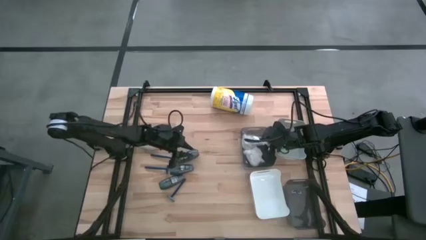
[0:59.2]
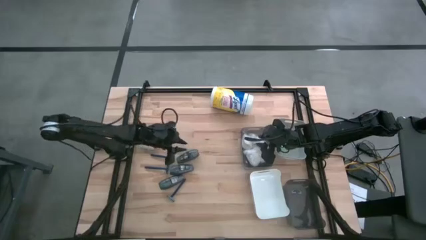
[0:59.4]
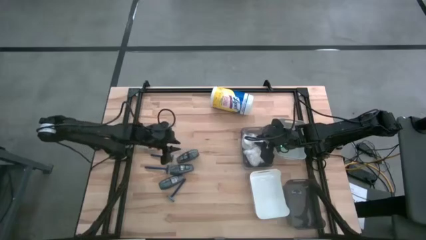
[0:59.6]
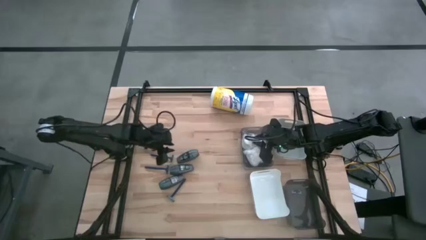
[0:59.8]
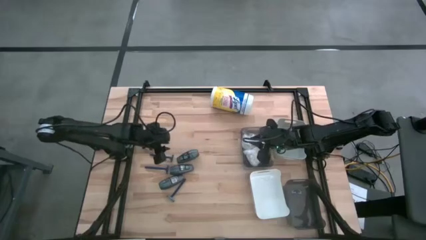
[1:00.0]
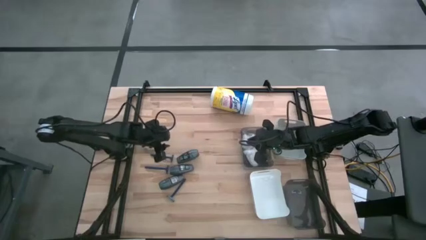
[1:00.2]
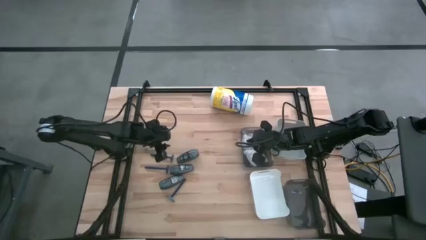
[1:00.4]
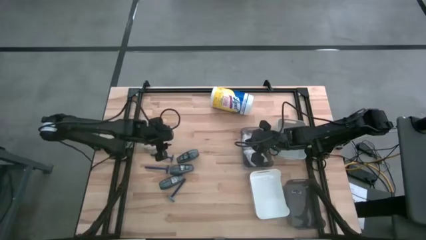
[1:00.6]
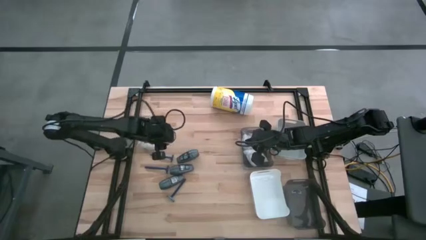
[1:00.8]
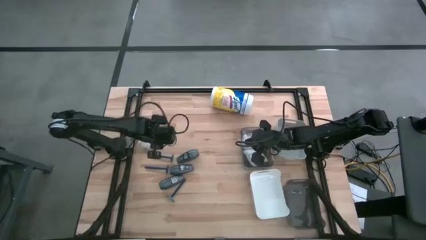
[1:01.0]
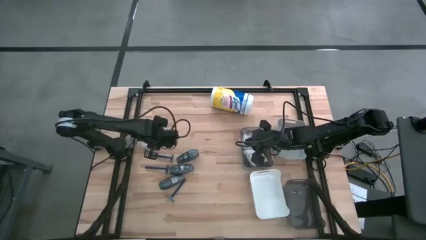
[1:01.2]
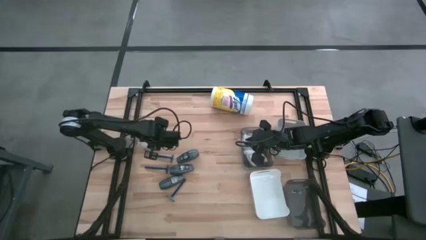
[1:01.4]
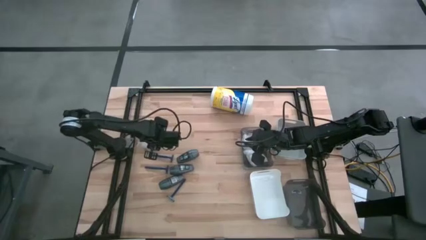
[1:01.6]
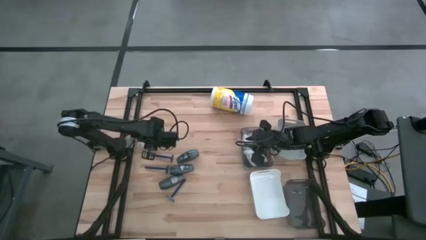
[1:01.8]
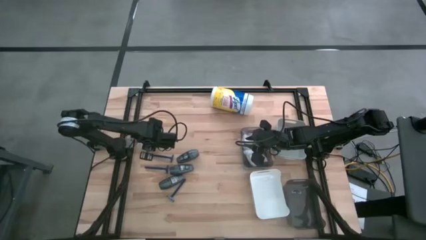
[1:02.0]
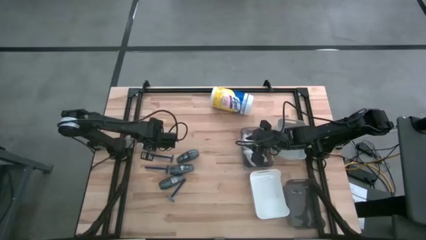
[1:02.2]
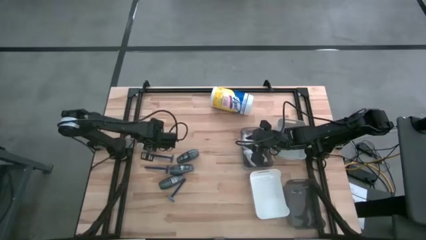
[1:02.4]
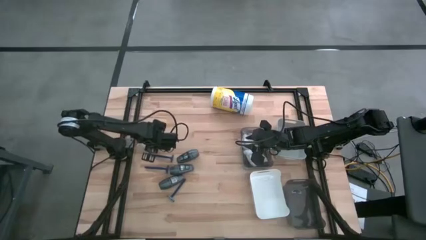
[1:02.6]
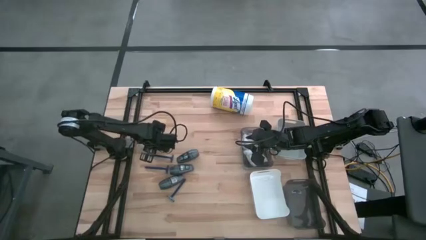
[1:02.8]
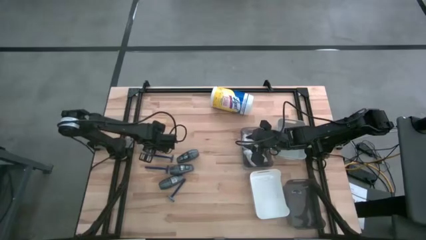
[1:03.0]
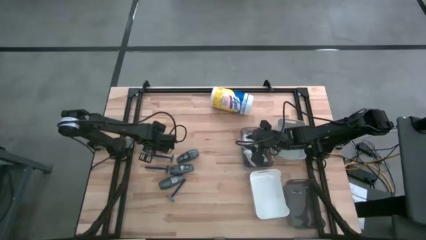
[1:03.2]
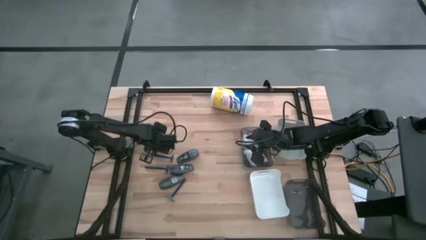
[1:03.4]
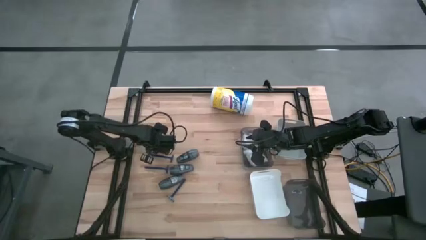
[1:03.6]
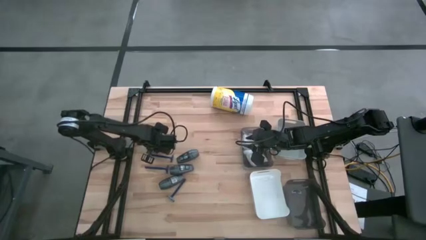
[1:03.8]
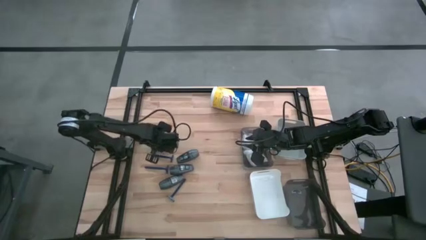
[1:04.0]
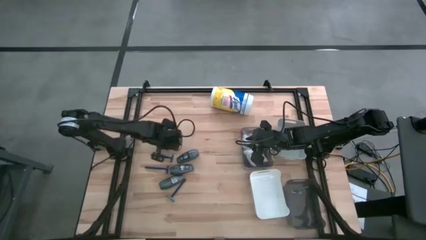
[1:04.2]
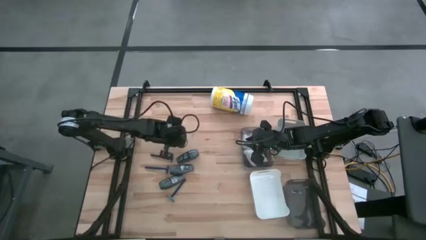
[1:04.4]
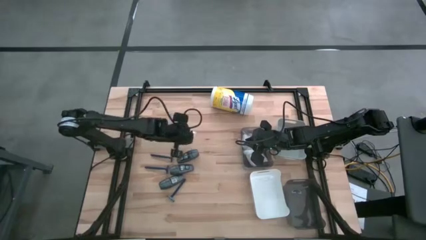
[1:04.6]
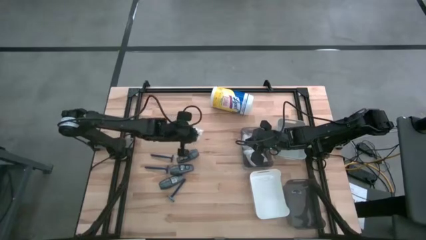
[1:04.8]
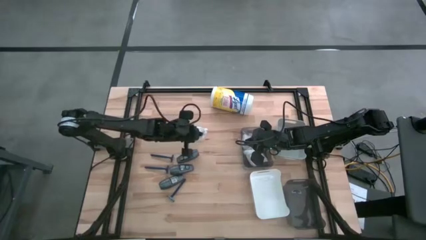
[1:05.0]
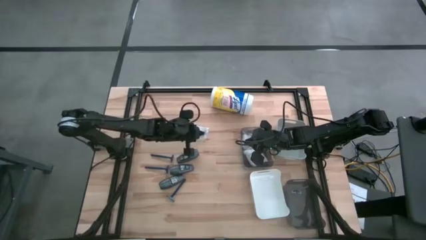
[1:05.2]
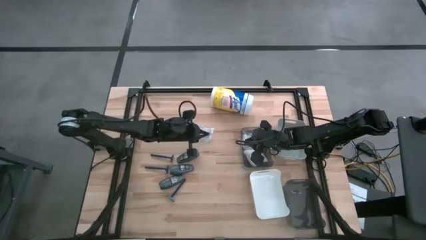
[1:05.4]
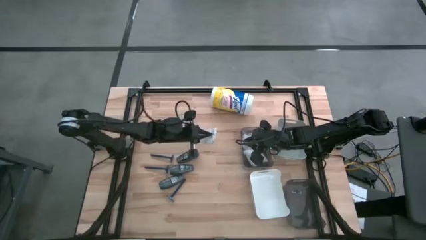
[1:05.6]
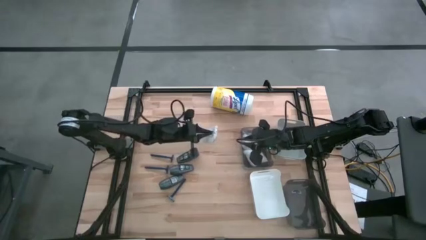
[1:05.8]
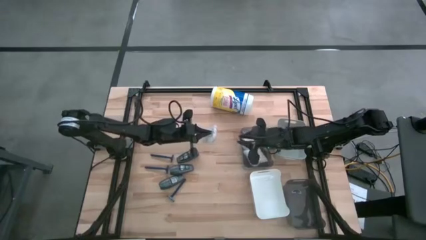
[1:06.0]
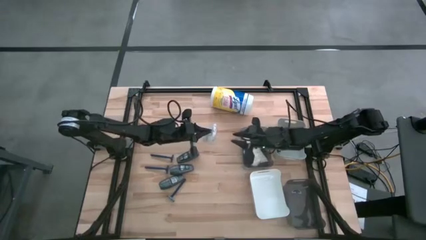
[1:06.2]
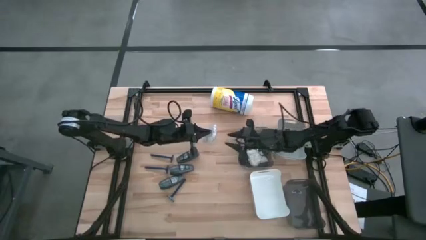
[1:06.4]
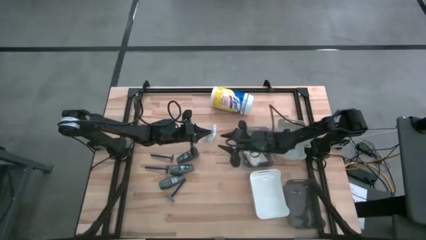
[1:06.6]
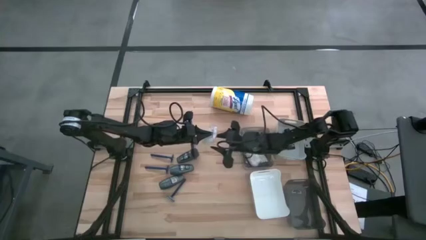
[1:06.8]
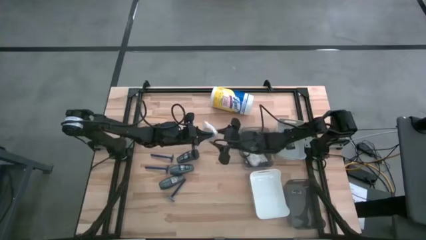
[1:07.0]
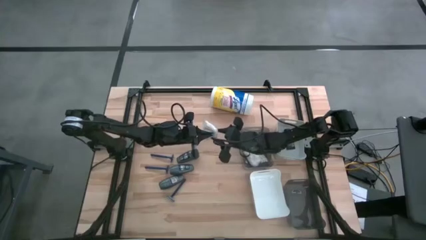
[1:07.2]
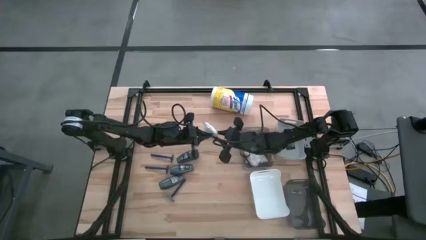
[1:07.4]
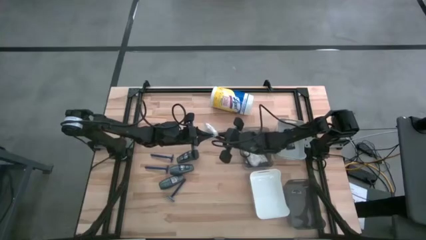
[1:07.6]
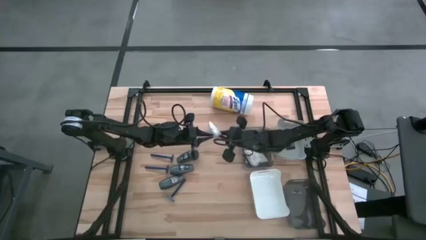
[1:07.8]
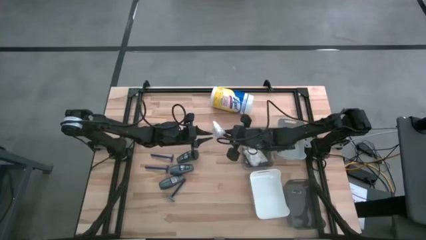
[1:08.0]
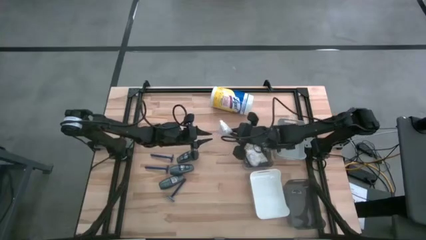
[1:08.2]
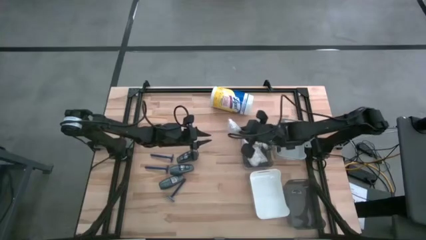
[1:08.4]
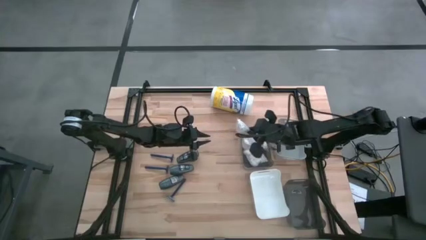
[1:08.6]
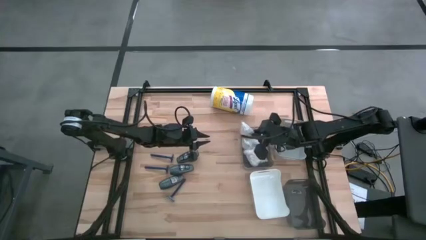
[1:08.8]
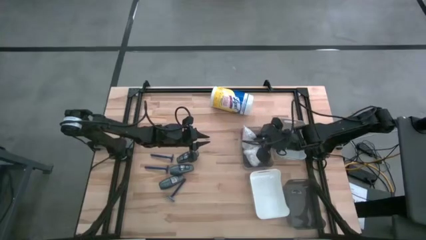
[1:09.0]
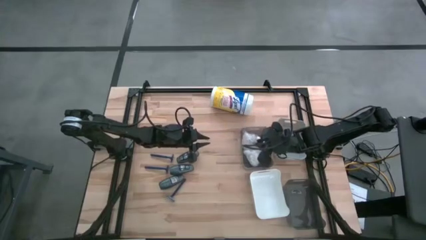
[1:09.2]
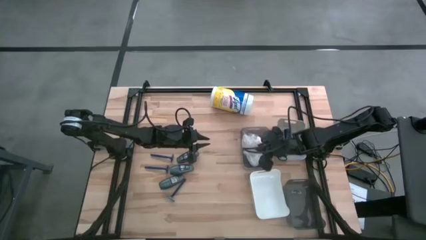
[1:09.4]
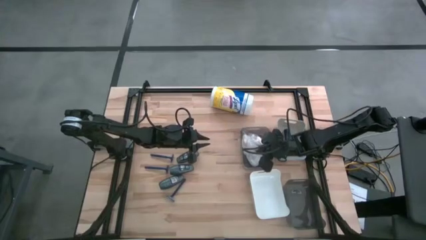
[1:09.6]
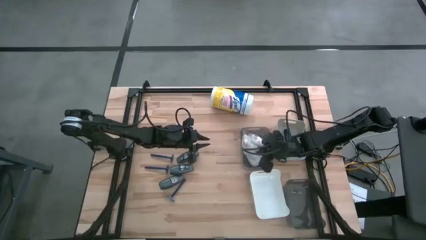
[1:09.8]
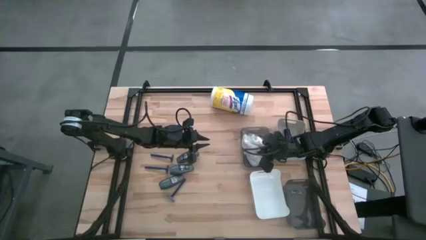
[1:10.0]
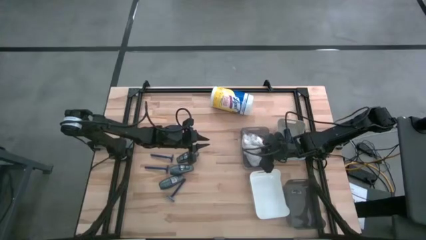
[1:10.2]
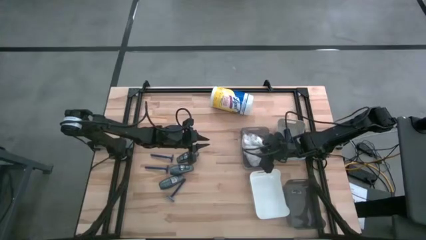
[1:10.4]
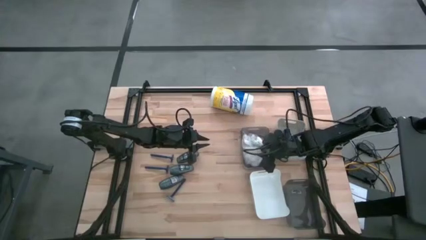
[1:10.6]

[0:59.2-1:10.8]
Task: Pick & Place Travel size toiletries
Put the cotton pack into the top black bin

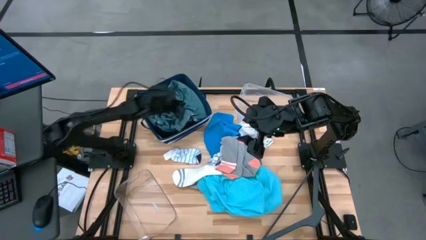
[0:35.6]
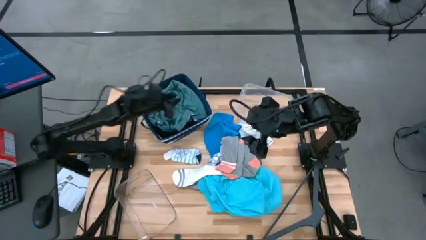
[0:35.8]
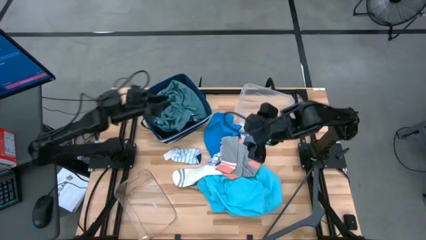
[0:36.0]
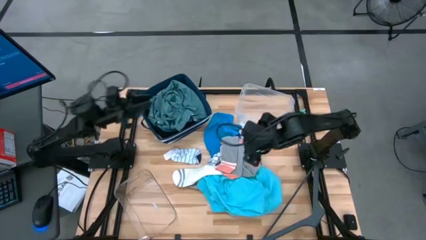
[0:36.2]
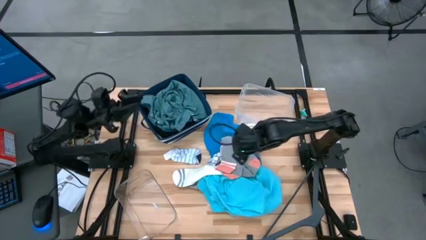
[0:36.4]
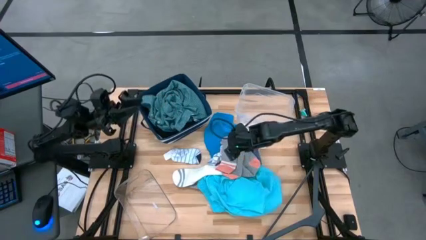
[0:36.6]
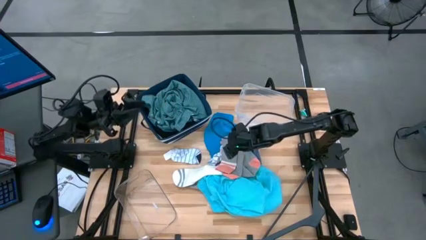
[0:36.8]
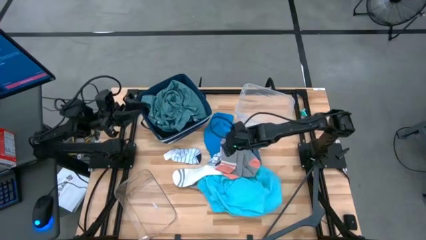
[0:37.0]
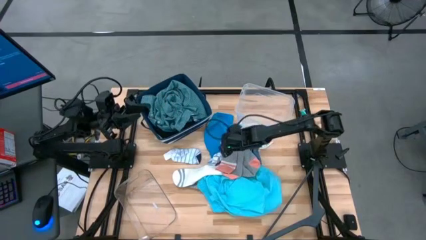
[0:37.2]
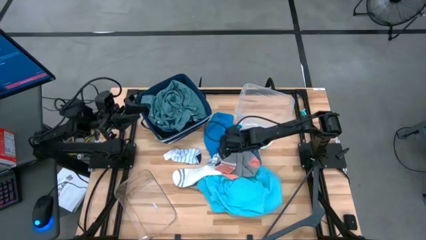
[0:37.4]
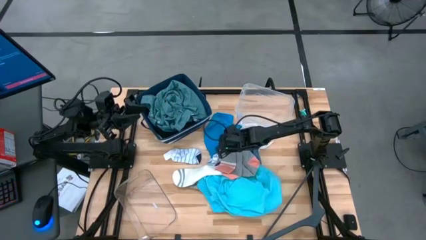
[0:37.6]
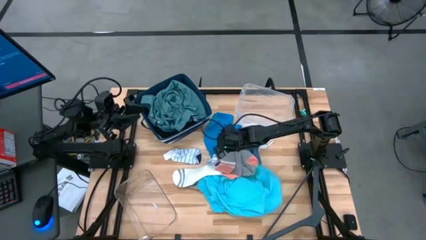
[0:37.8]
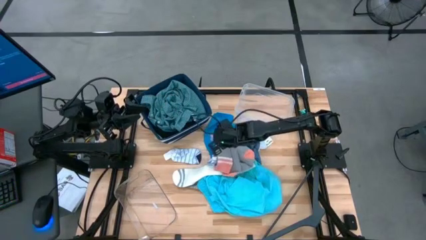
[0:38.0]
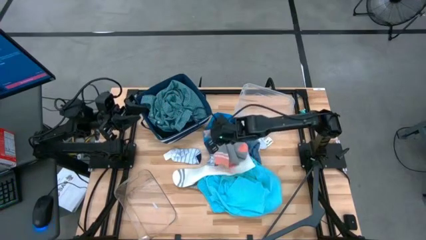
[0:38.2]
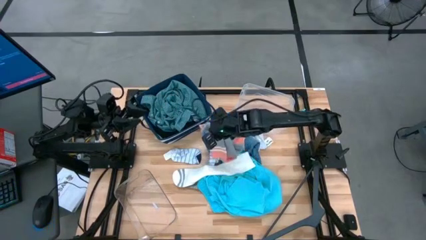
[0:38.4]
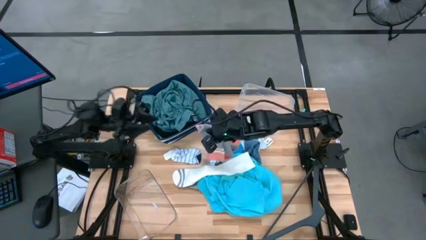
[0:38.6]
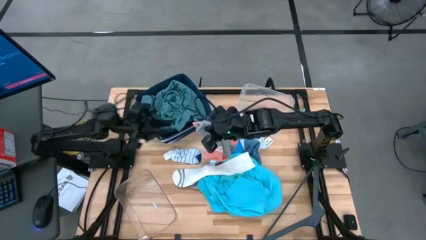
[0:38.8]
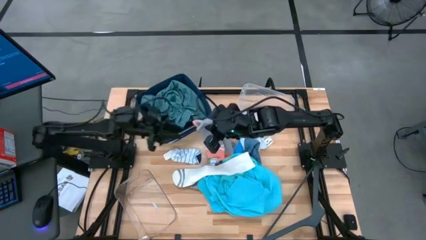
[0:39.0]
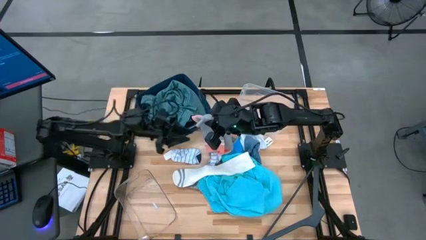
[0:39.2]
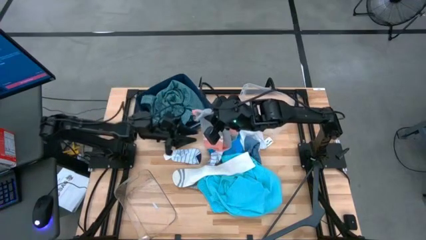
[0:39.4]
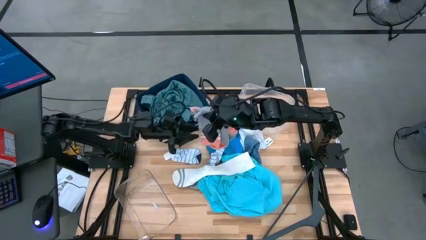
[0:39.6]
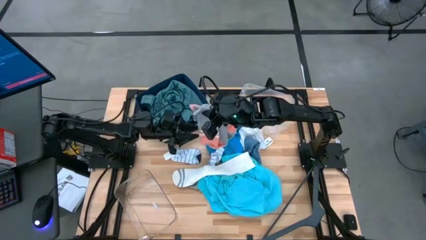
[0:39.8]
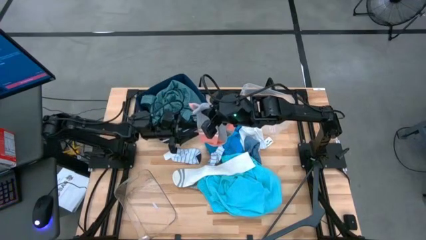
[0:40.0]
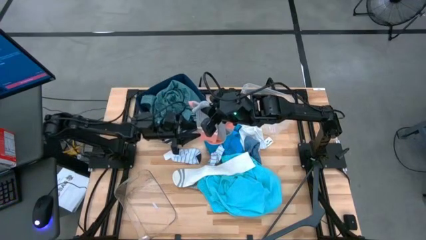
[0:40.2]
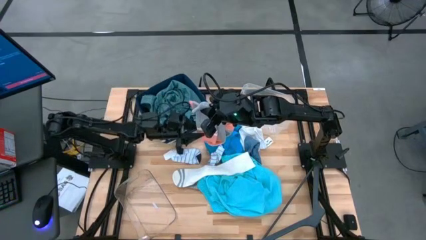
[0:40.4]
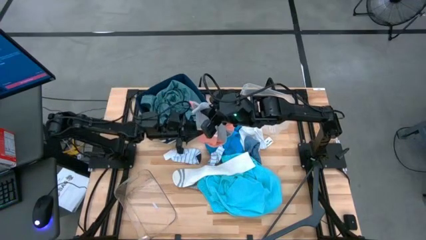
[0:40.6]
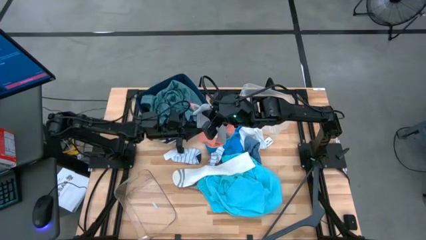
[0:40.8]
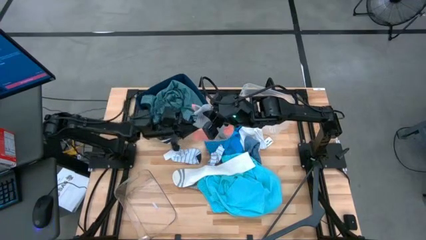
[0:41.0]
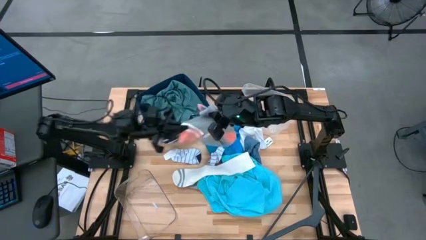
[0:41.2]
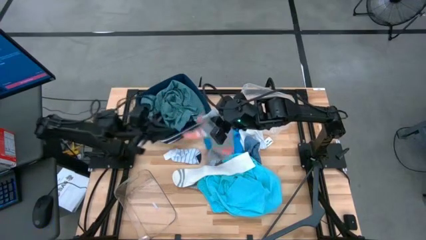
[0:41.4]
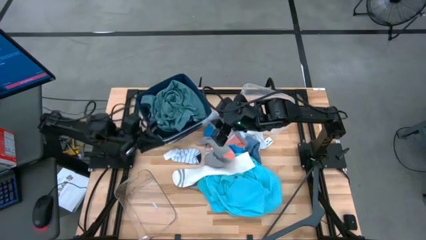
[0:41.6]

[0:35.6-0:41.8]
Task: Pick & Place Cloths
Put the top gray sock into the transparent bin
